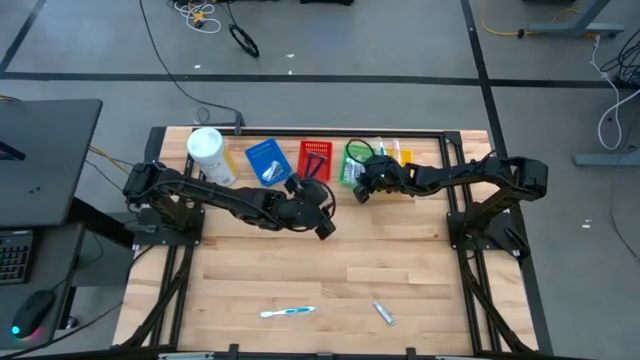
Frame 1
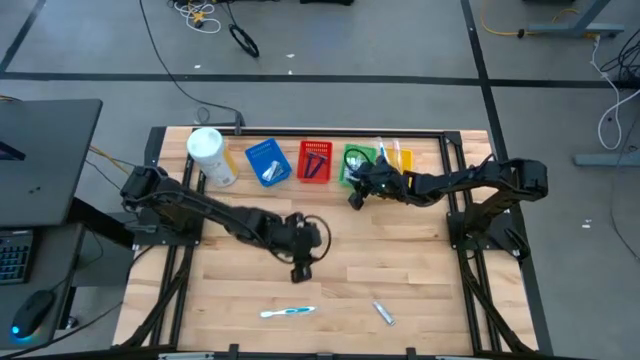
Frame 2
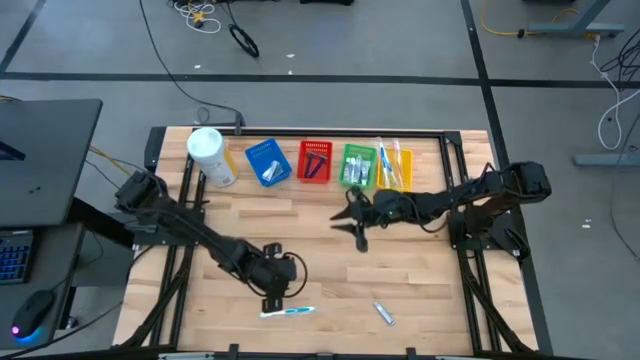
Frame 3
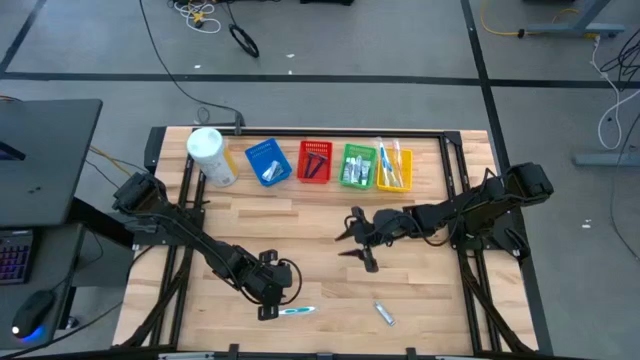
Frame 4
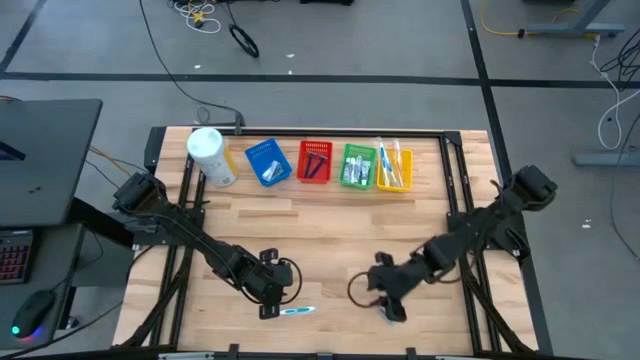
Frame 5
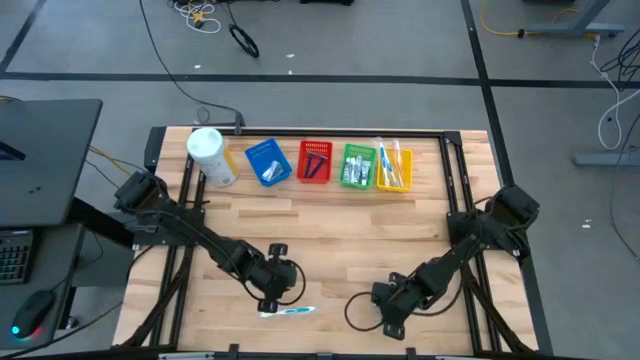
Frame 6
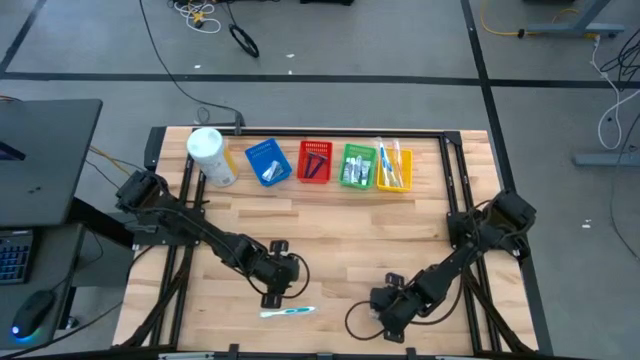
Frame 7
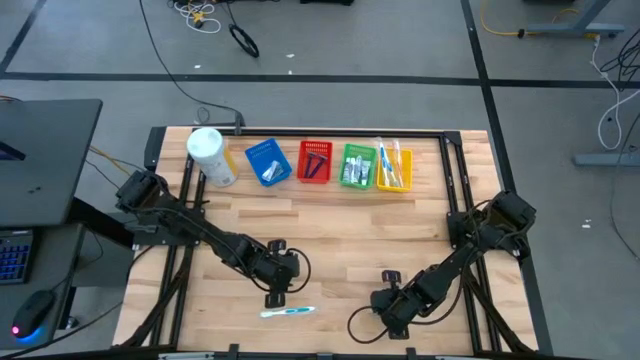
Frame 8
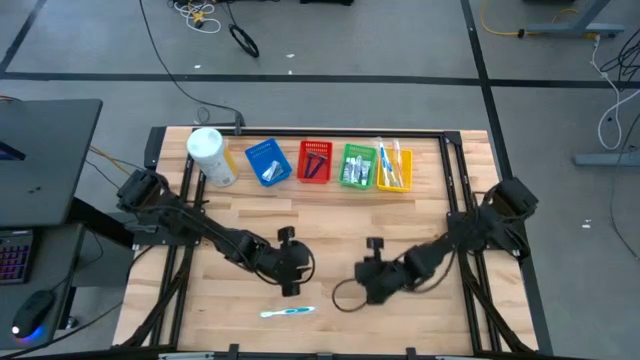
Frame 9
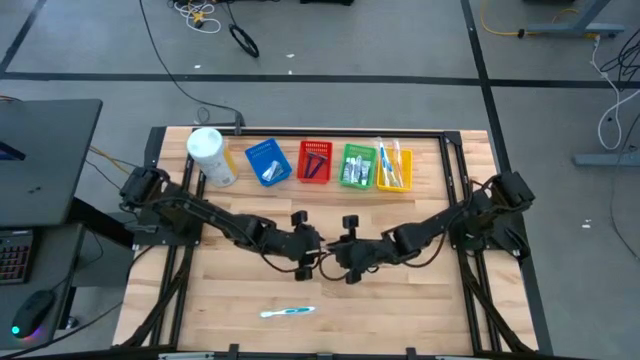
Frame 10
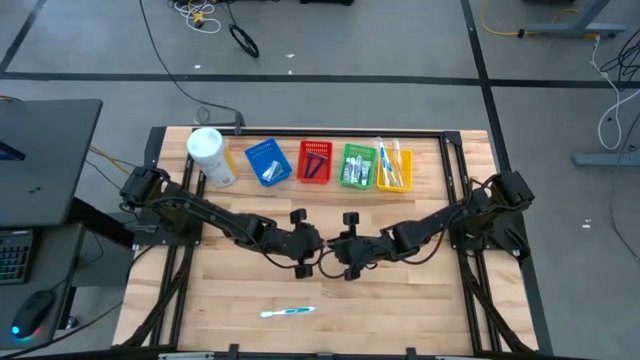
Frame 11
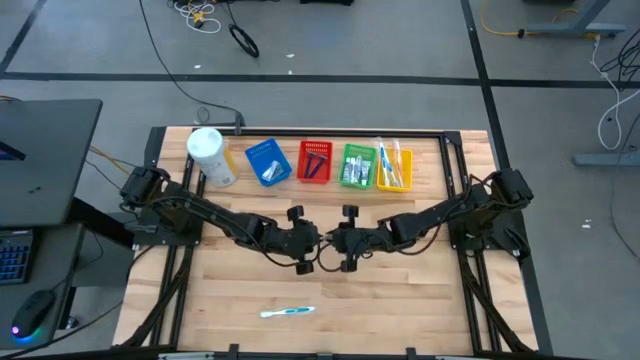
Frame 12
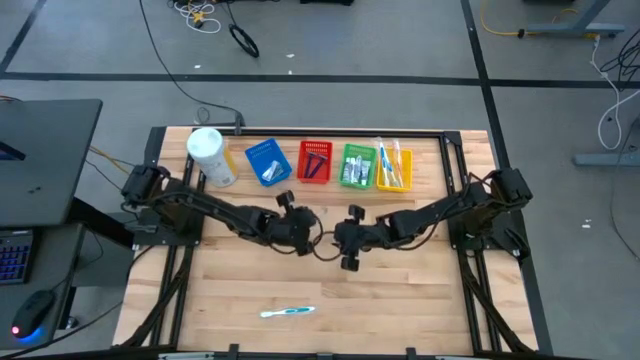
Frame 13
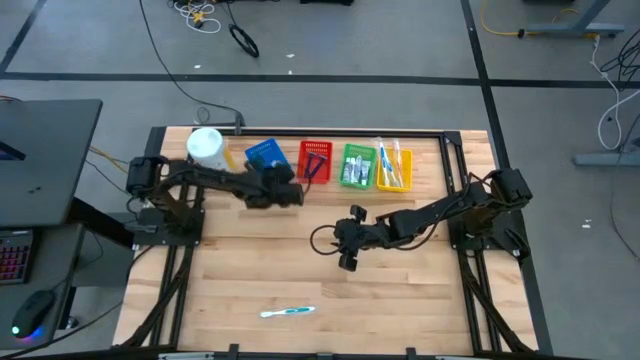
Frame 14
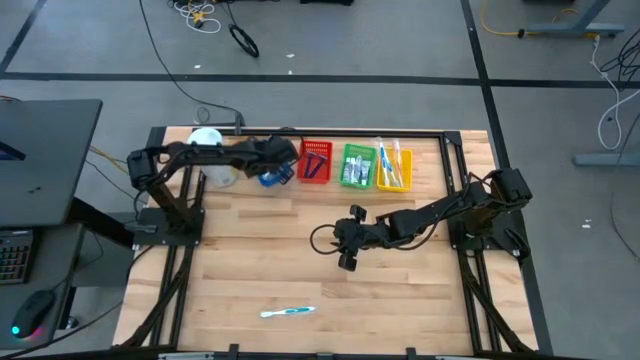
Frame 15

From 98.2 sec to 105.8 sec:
Task: Pick & Place Travel size toiletries
Put the silver nail cutter into the blue basket

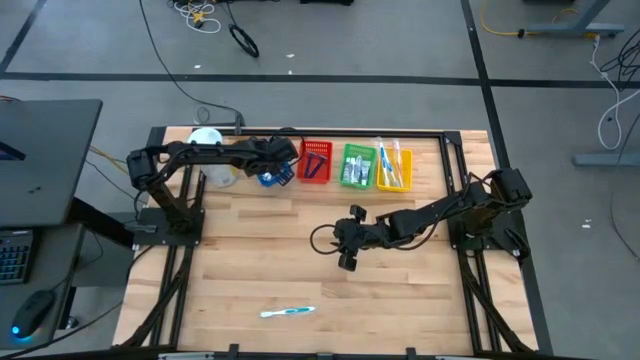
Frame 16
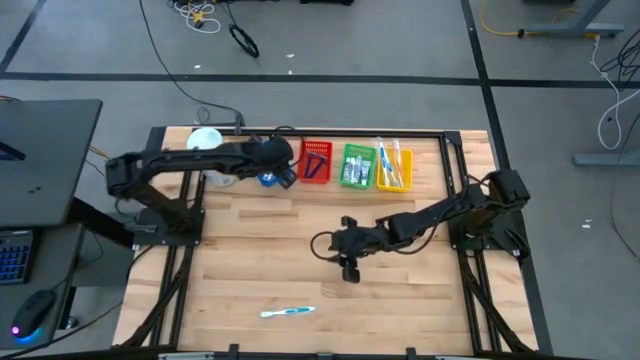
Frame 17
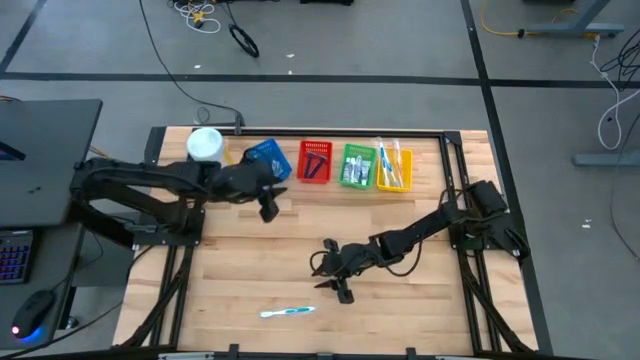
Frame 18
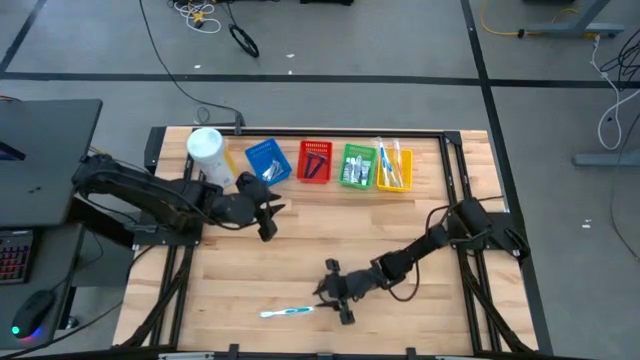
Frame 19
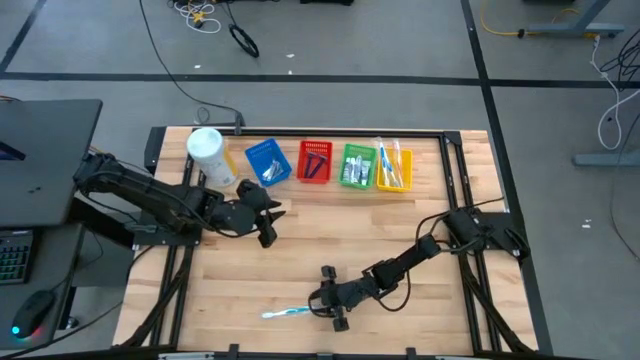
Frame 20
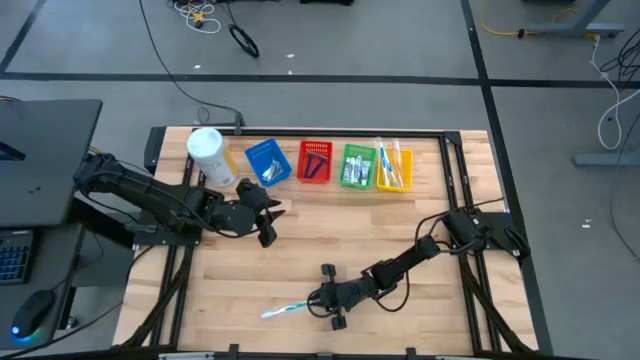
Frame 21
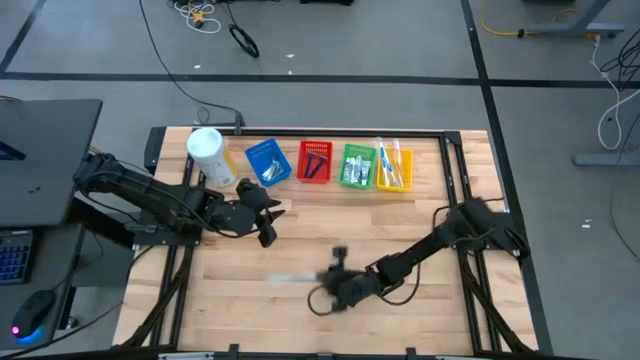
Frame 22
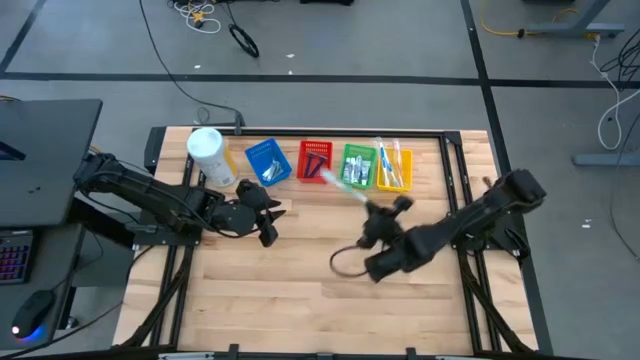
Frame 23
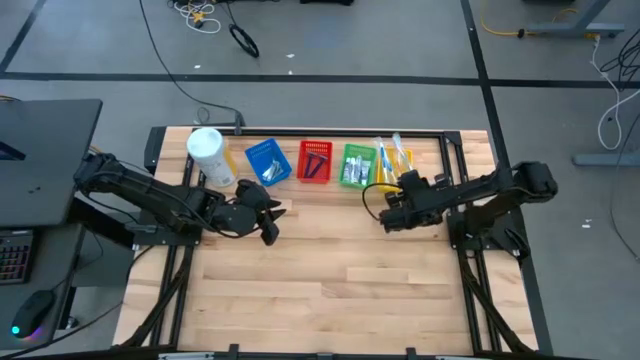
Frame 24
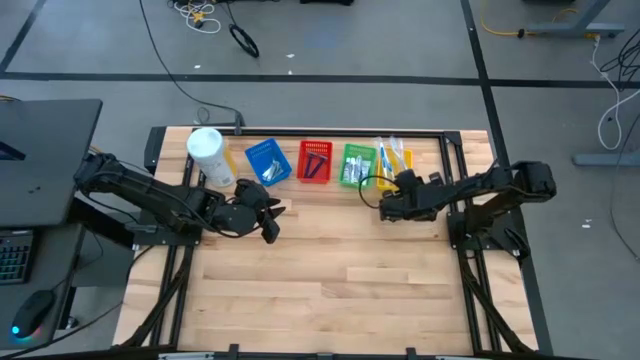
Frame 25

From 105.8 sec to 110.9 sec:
Put the green toothbrush into the yellow basket

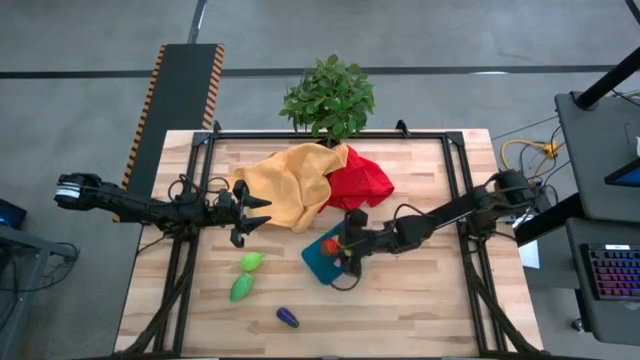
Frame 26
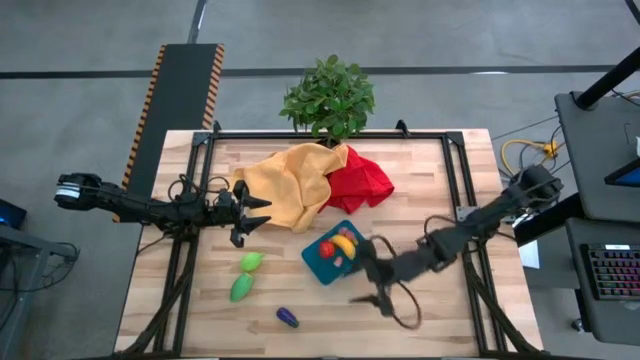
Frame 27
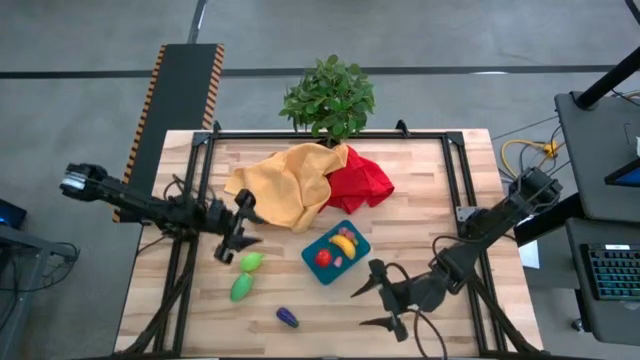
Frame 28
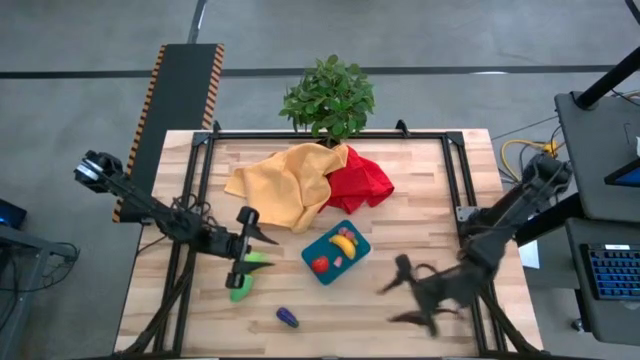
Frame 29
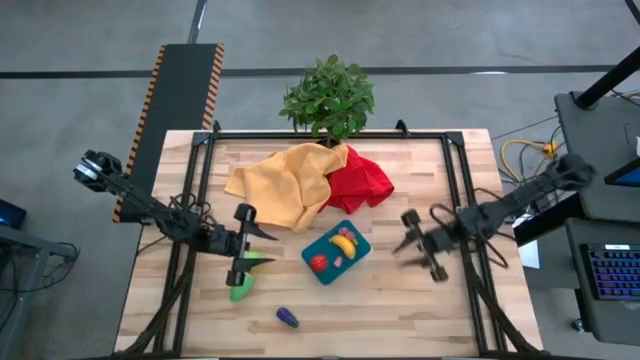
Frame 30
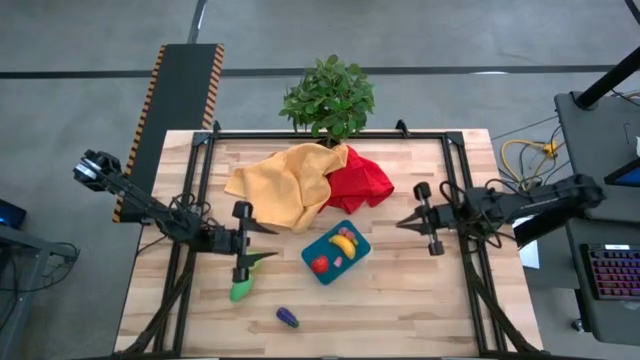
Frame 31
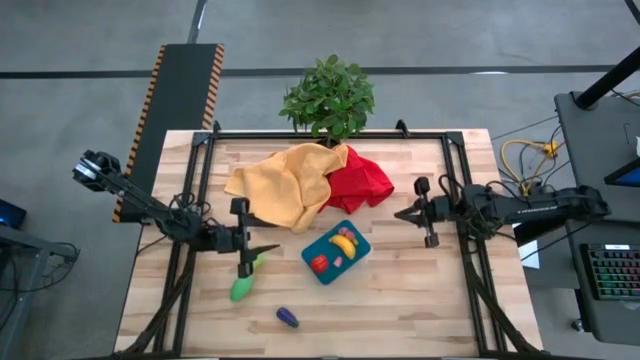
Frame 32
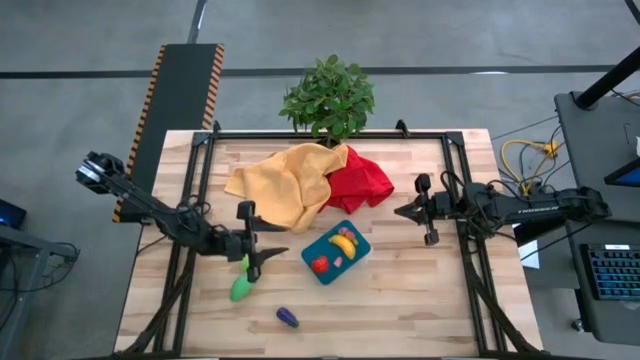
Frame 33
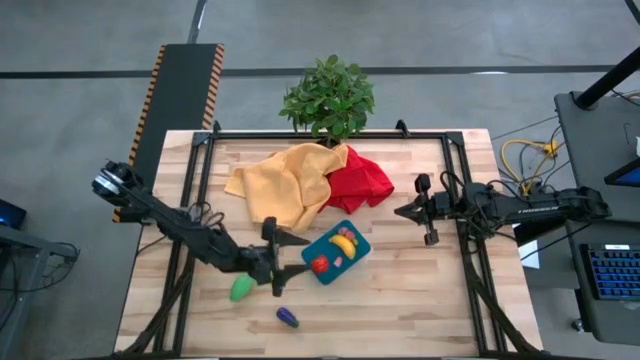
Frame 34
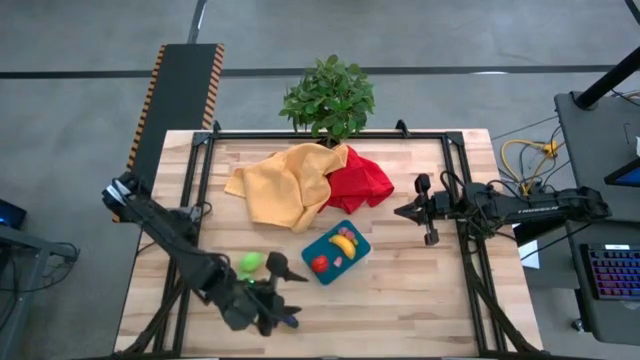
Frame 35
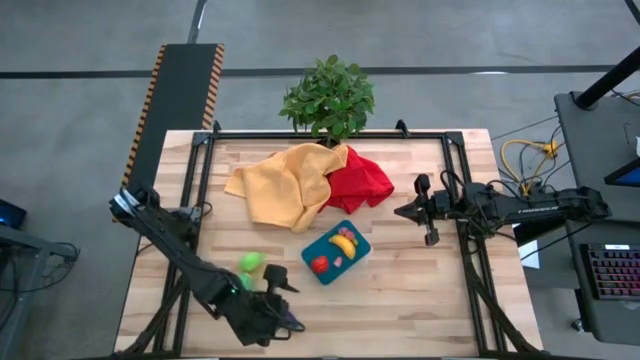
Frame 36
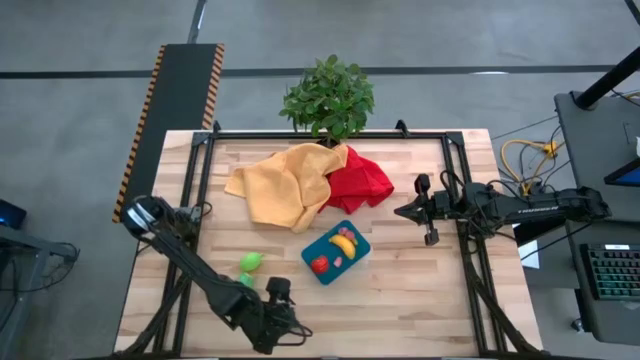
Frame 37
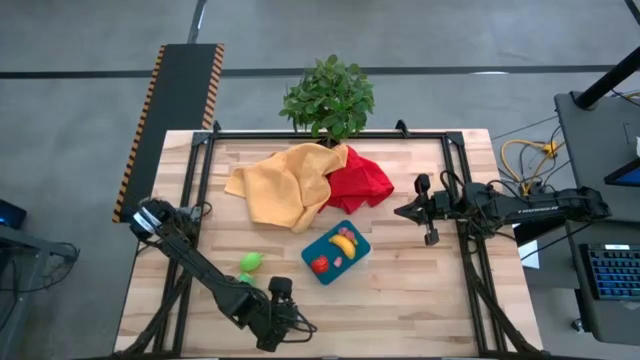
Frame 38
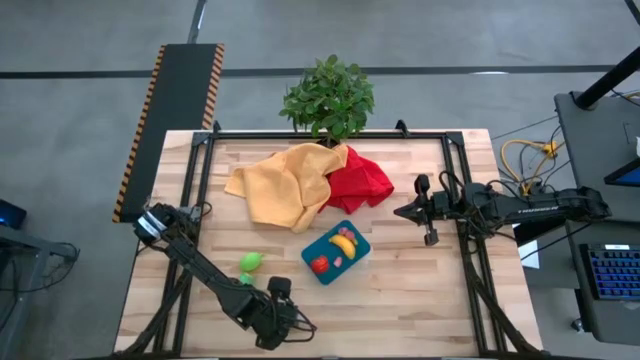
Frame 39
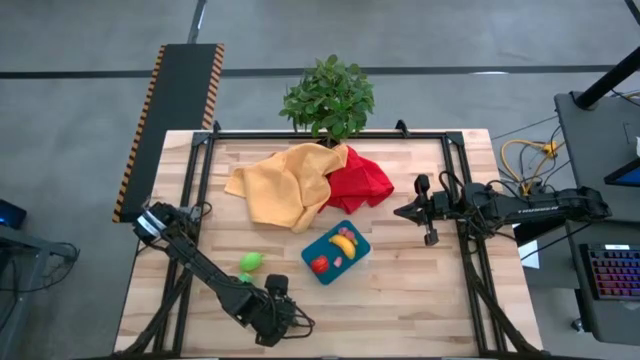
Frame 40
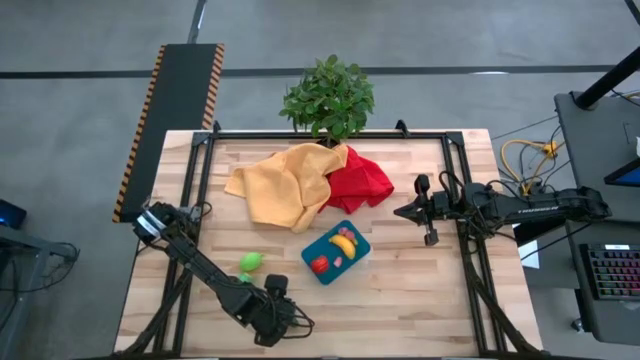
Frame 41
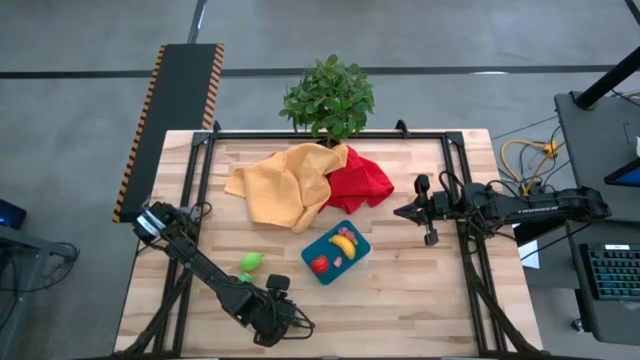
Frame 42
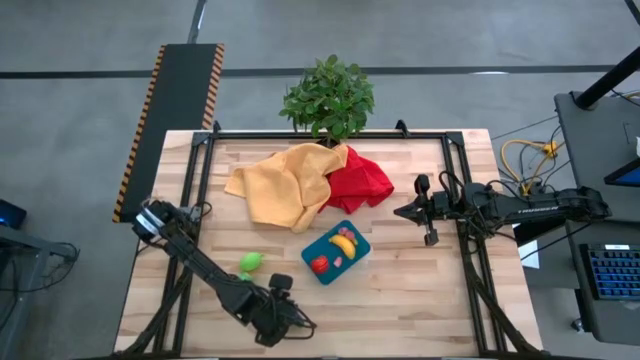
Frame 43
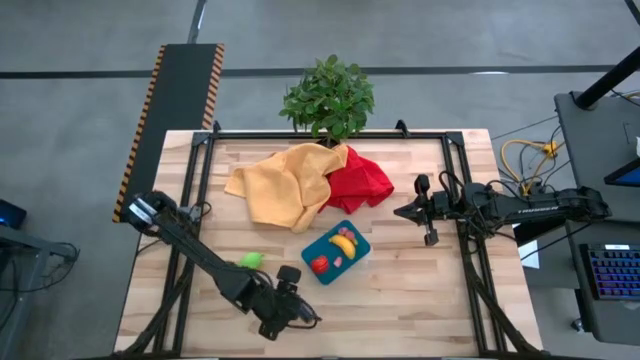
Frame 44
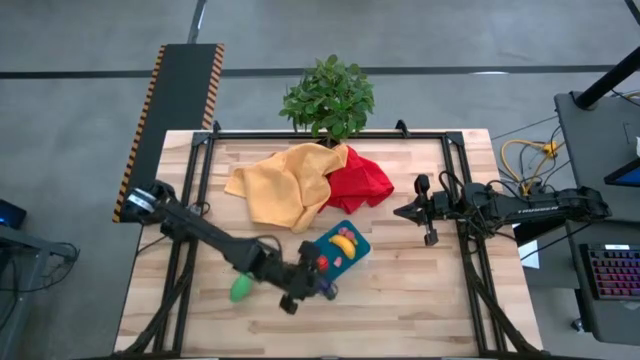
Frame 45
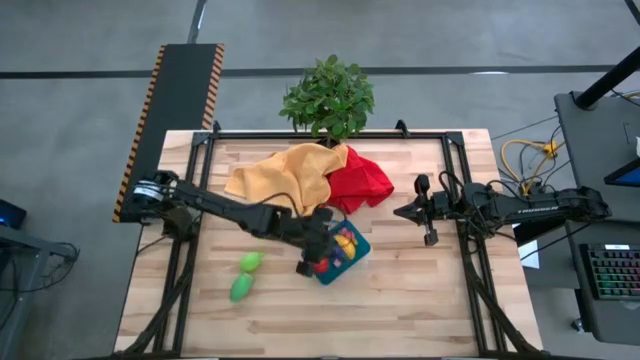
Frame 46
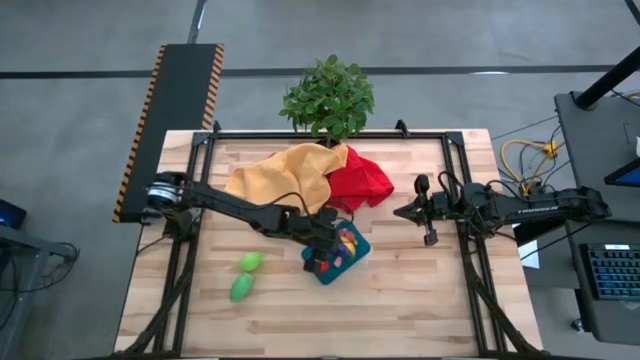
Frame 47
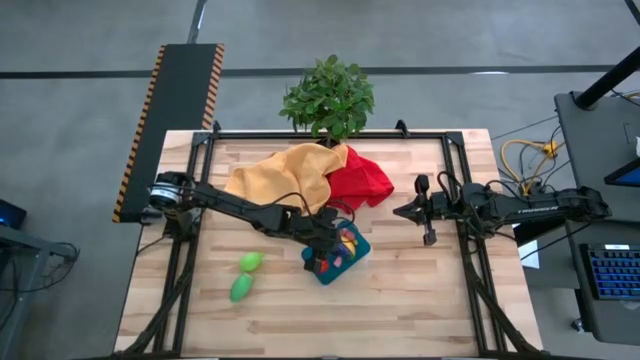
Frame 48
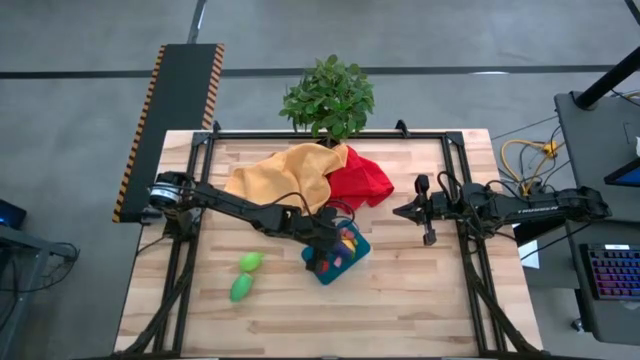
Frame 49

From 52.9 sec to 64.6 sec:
Task: Pick and placing Produce into tupperware
Put the violet eggplant into the blue bin
